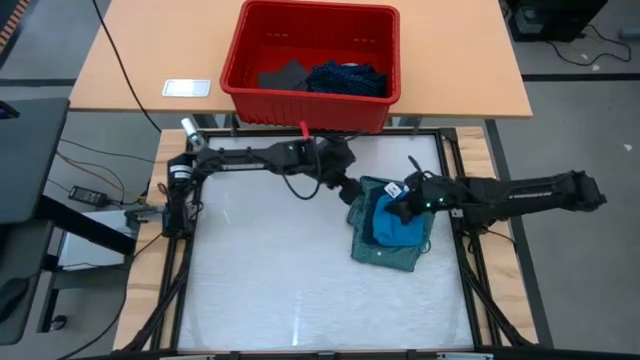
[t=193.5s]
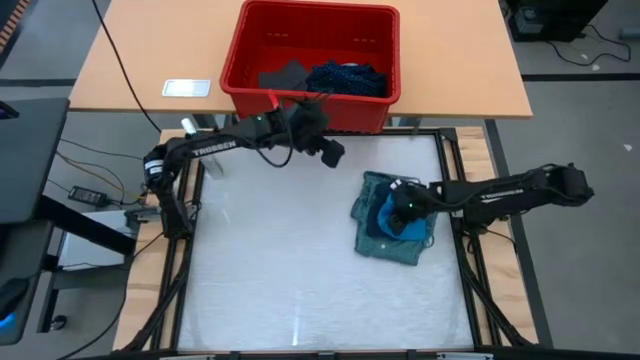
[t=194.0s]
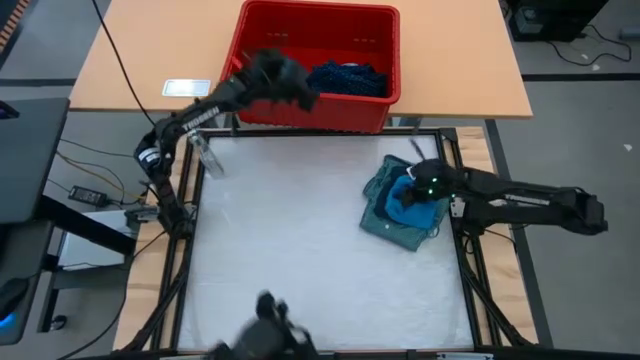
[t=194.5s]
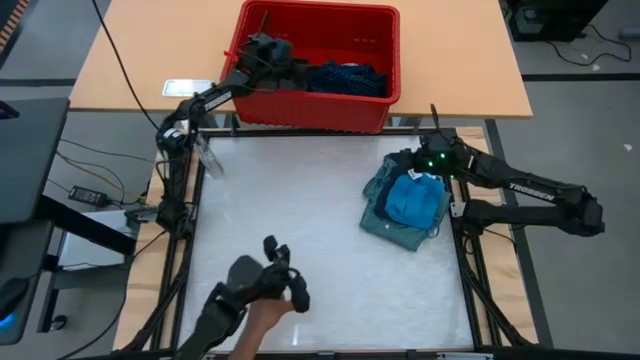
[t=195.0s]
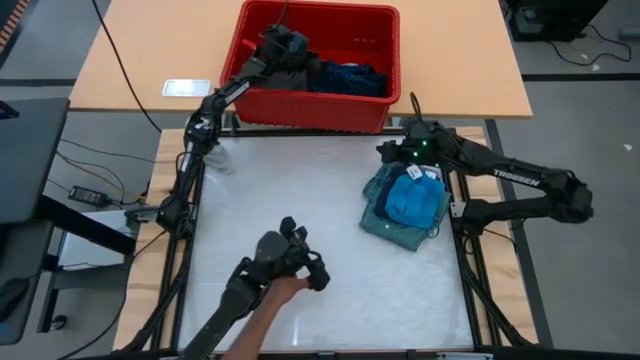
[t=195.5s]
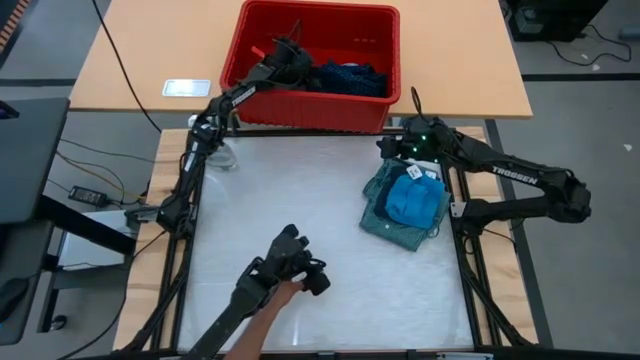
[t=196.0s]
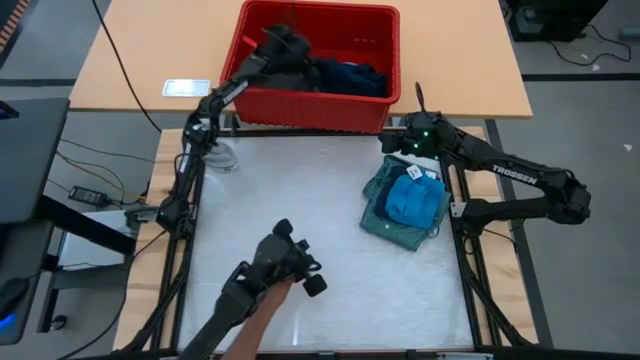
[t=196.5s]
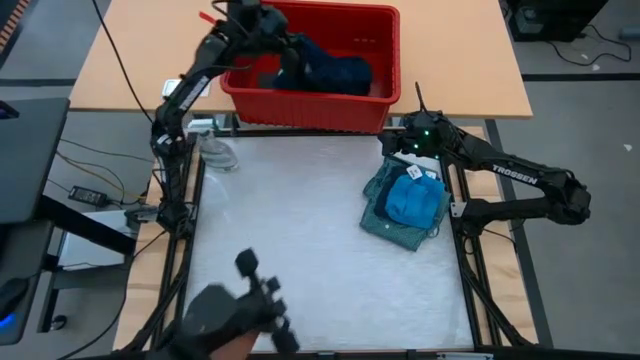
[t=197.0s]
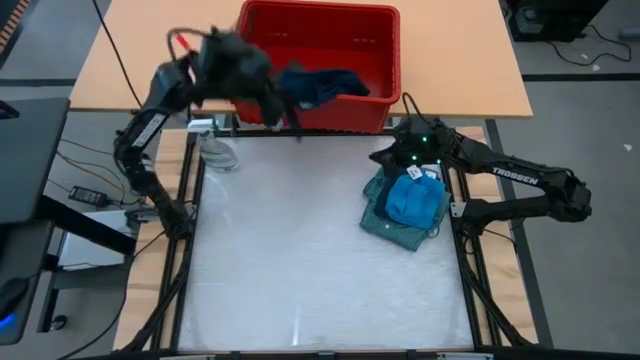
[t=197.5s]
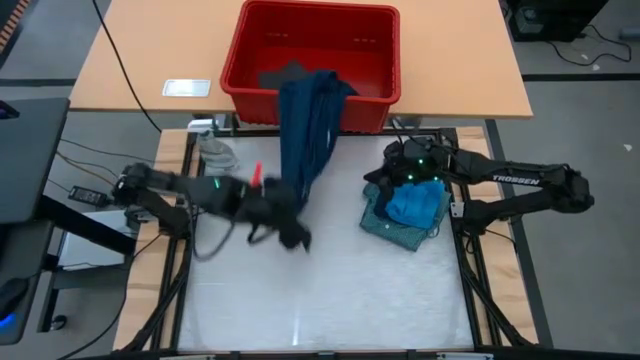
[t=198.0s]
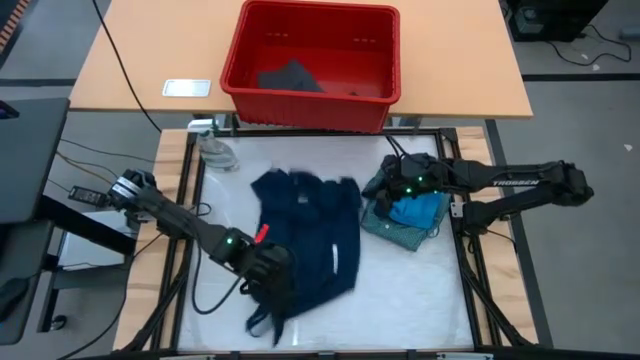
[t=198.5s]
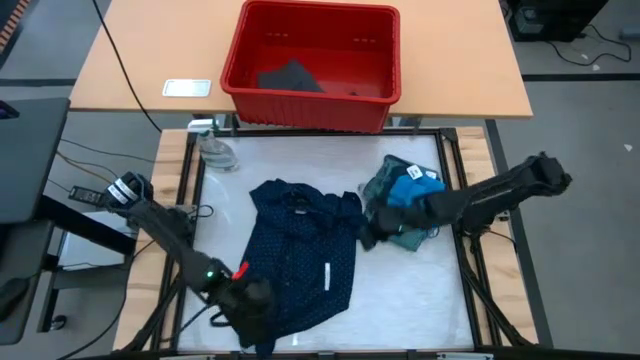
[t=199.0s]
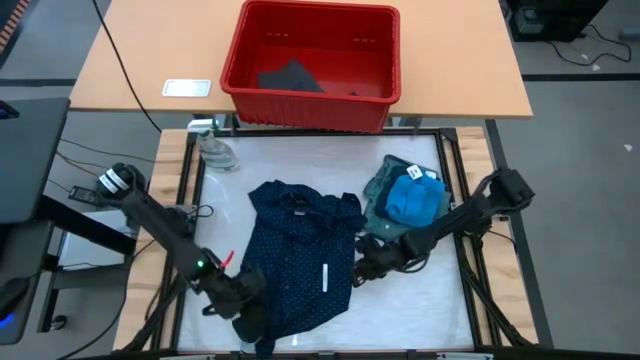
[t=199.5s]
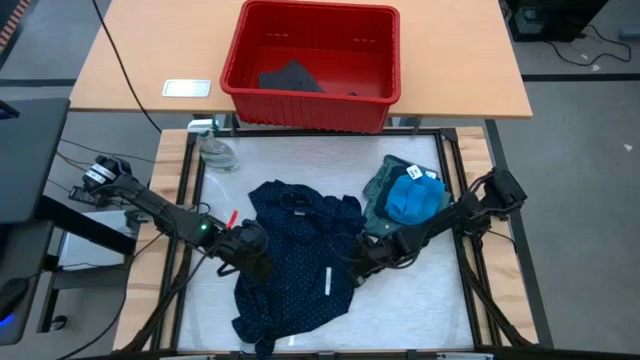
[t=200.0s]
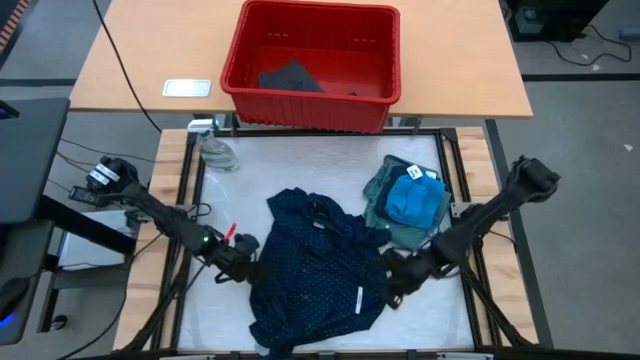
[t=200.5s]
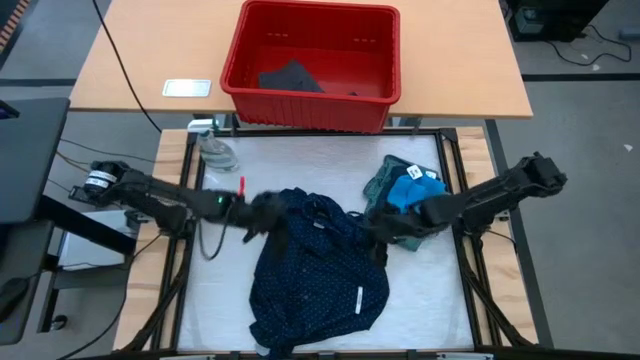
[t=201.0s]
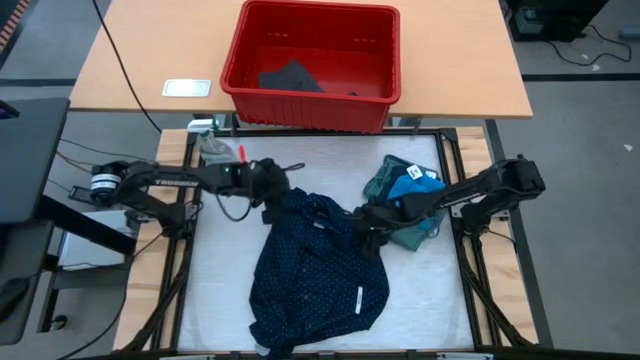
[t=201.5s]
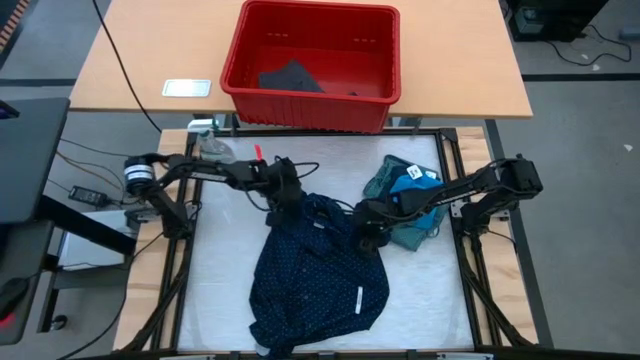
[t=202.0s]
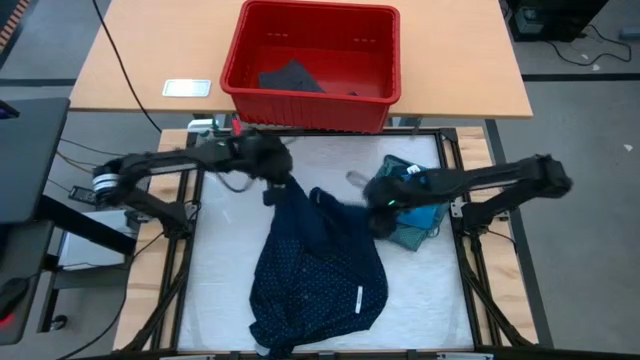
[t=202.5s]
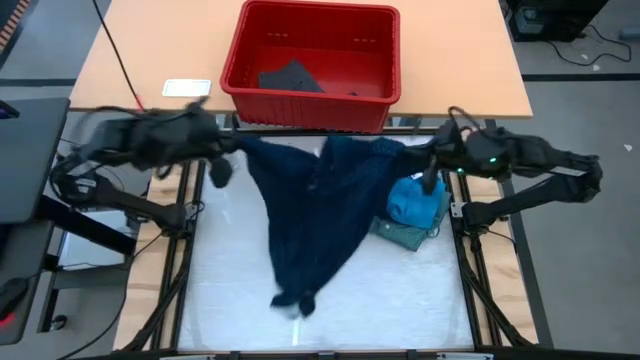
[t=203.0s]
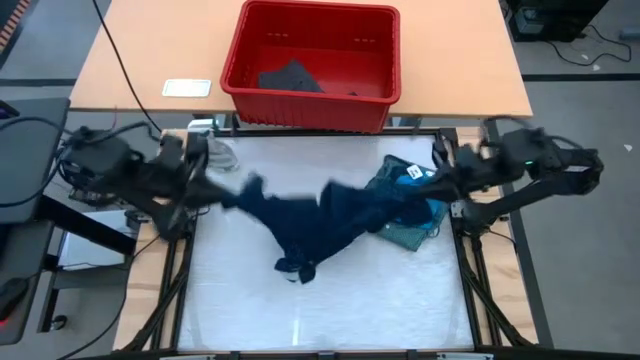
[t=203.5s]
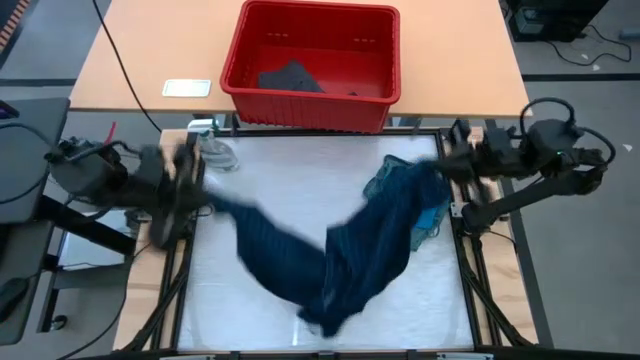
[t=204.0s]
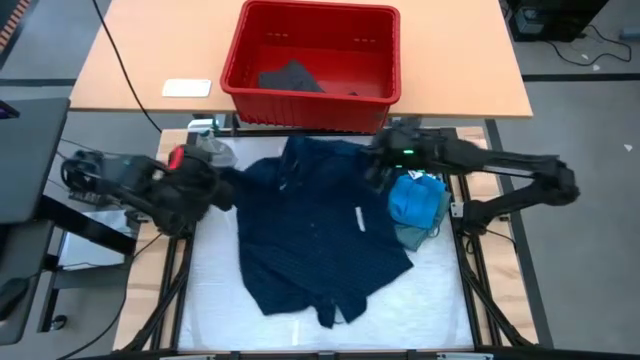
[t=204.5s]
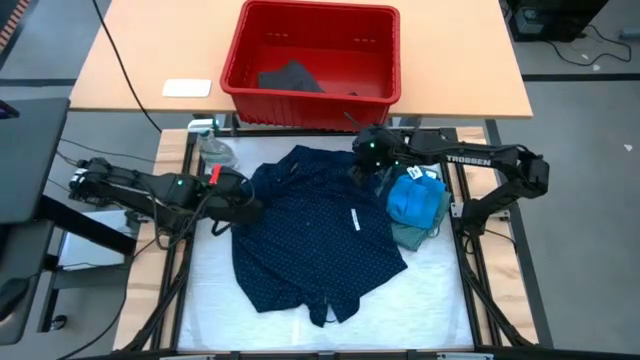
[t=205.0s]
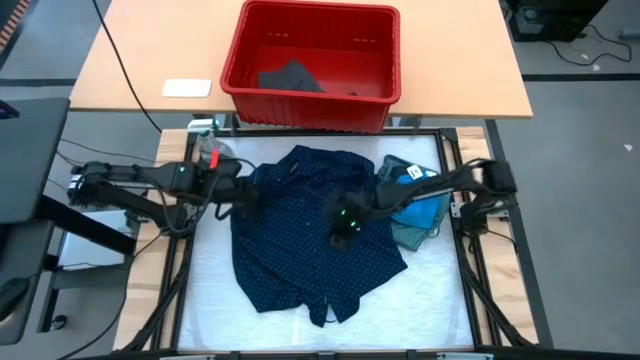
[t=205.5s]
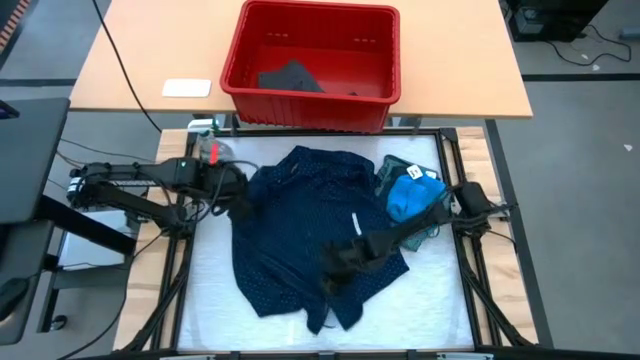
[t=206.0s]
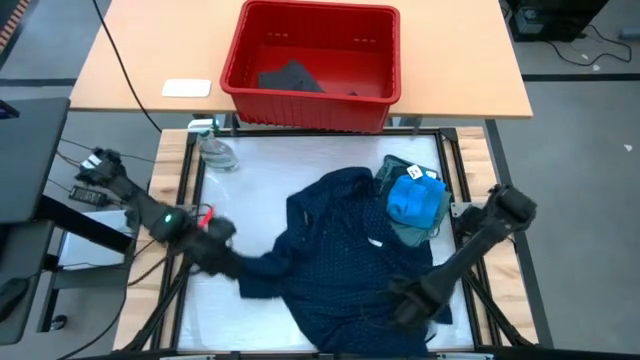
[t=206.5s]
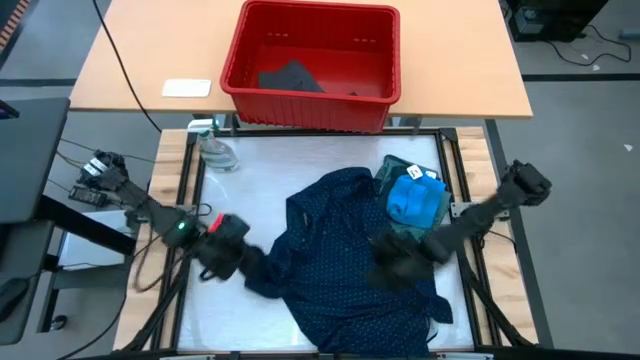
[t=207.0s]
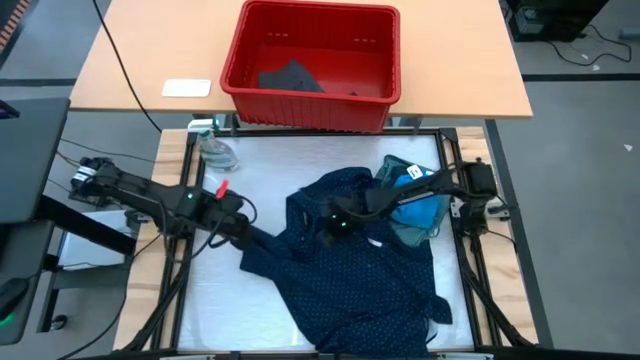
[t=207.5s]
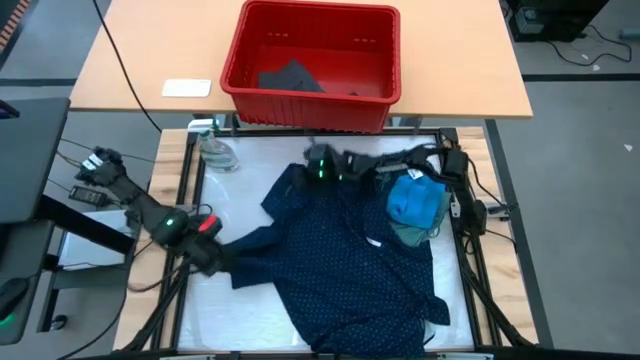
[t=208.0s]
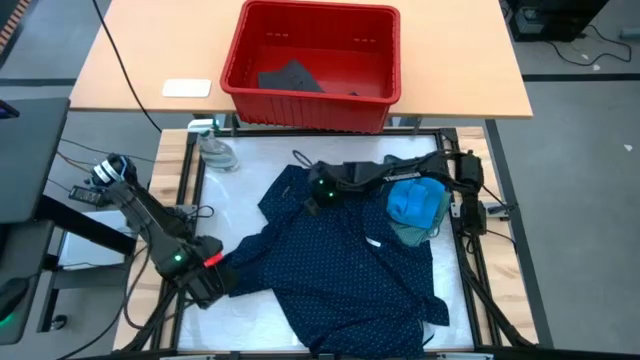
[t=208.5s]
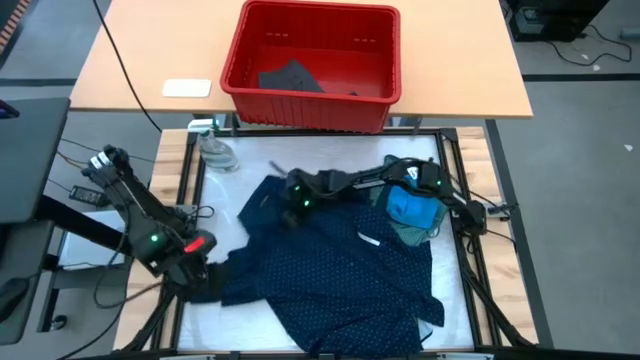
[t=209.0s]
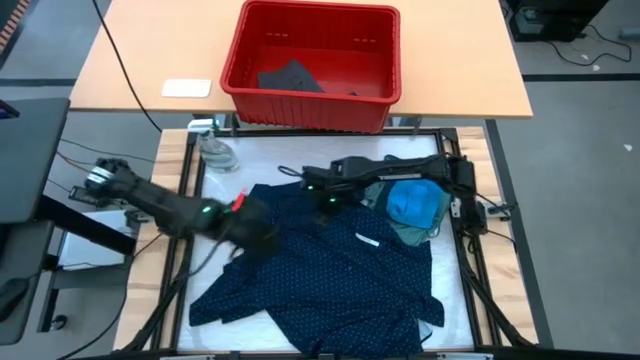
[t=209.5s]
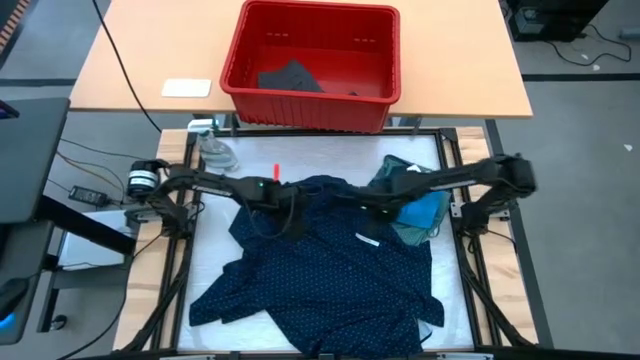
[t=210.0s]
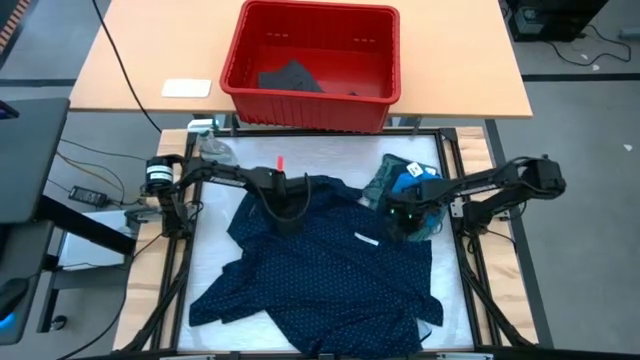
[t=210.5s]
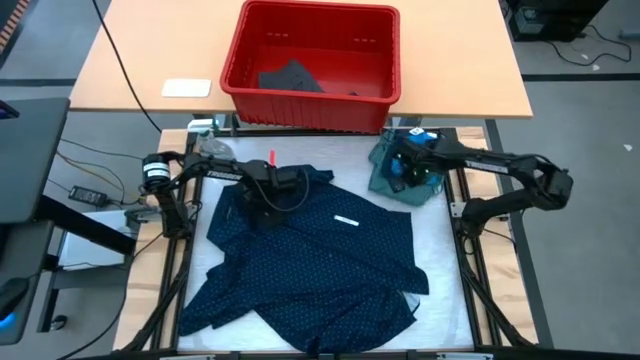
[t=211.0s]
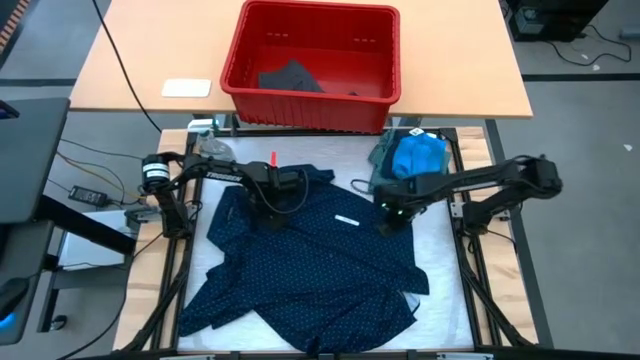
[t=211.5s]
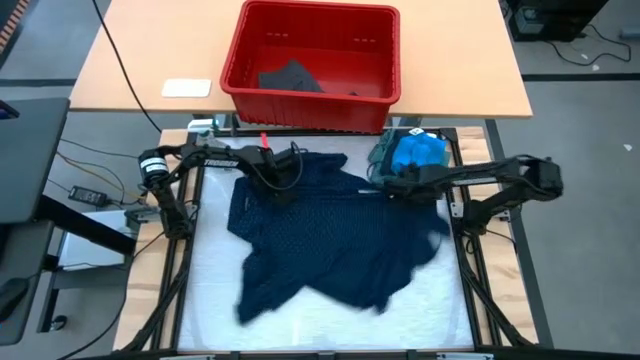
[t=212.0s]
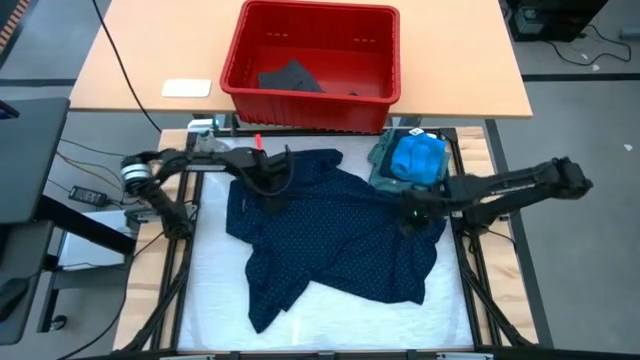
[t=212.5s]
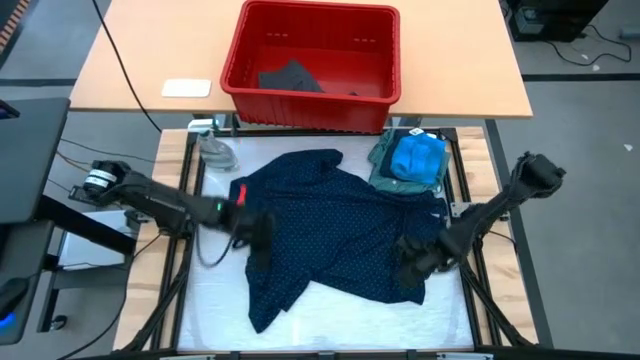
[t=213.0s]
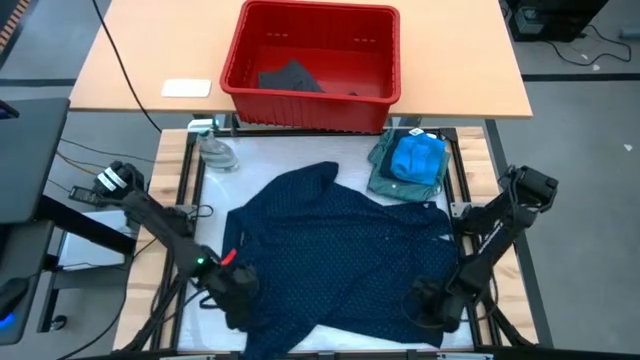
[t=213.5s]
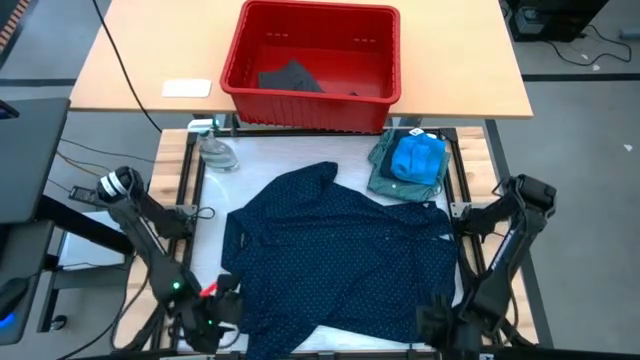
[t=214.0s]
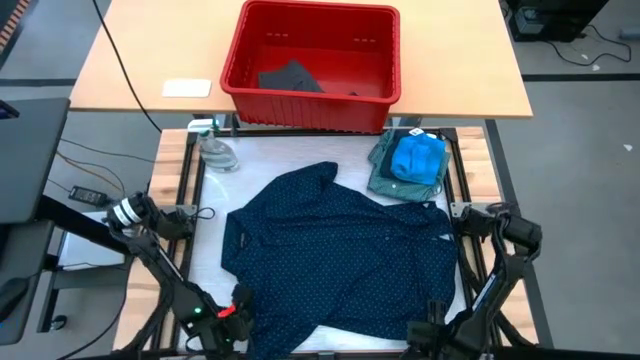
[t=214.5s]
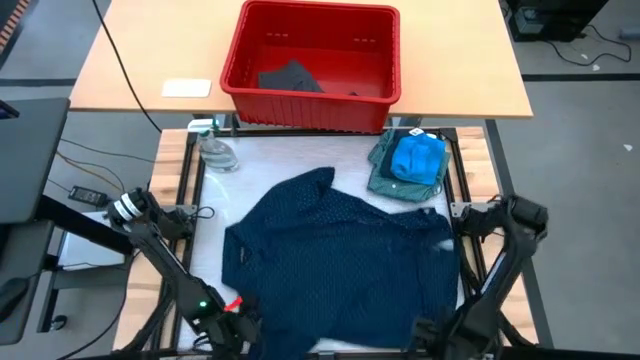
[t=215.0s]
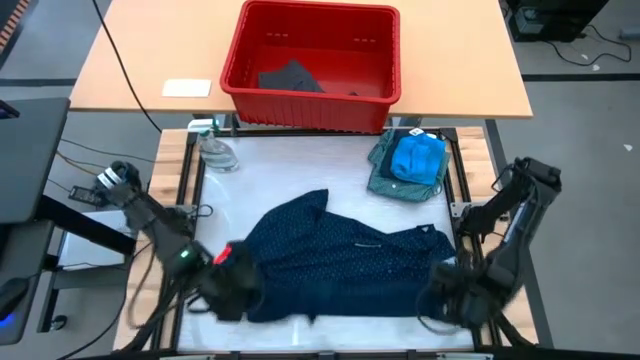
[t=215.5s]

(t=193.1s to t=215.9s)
Task: Fold laundry
Fold the dark blue polo shirt
